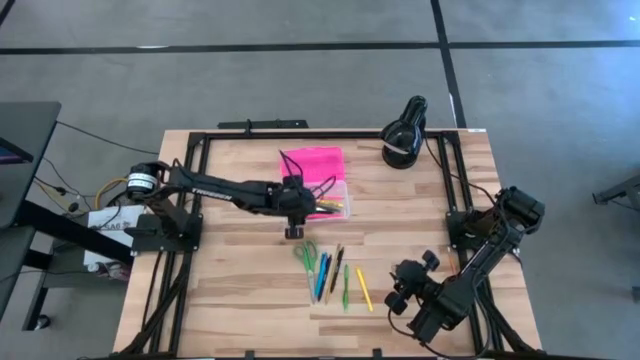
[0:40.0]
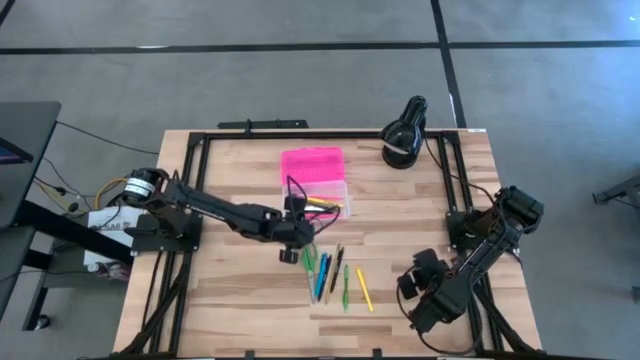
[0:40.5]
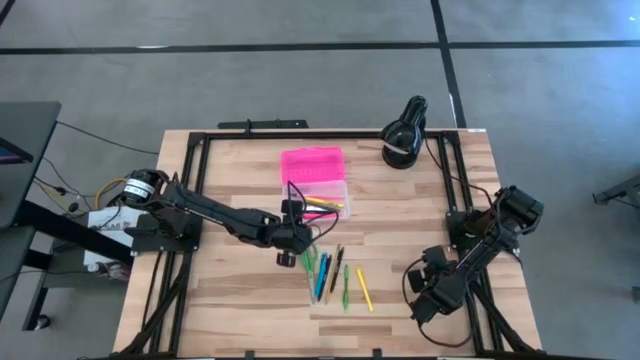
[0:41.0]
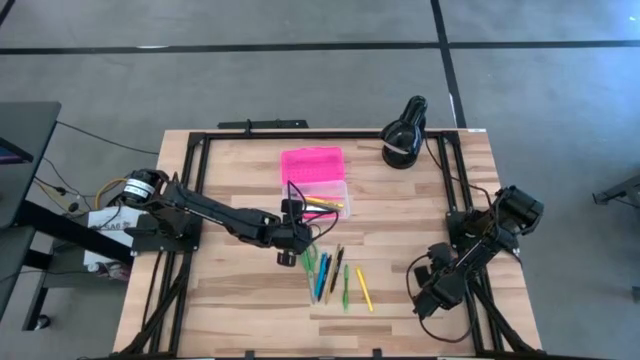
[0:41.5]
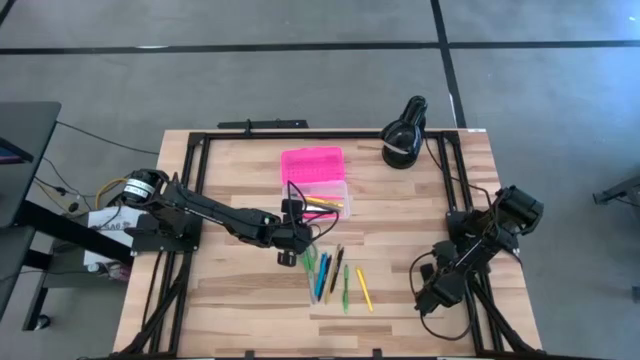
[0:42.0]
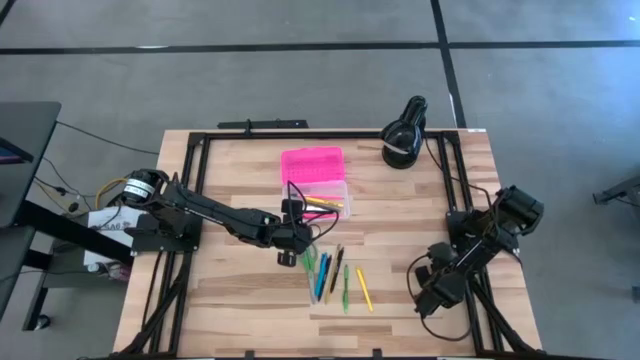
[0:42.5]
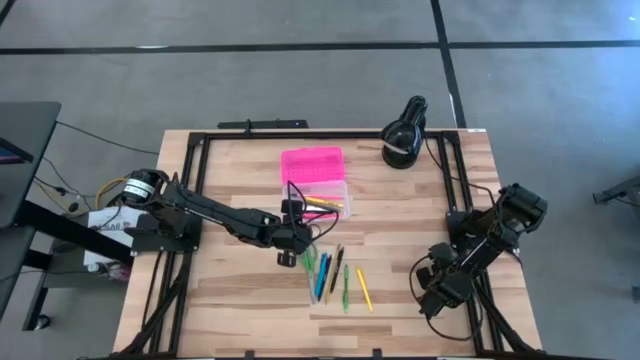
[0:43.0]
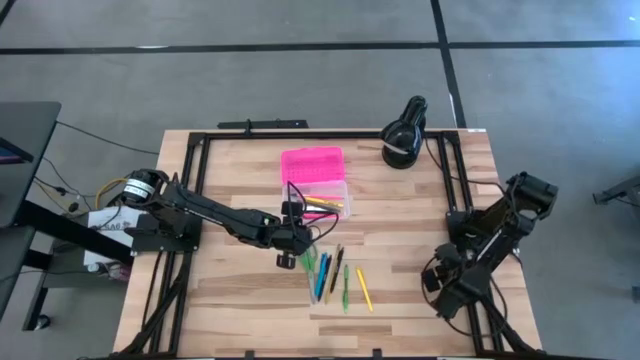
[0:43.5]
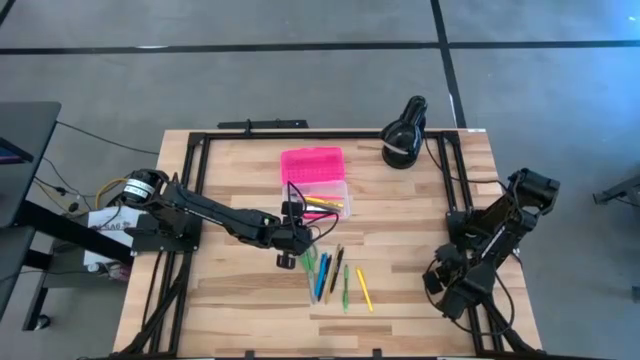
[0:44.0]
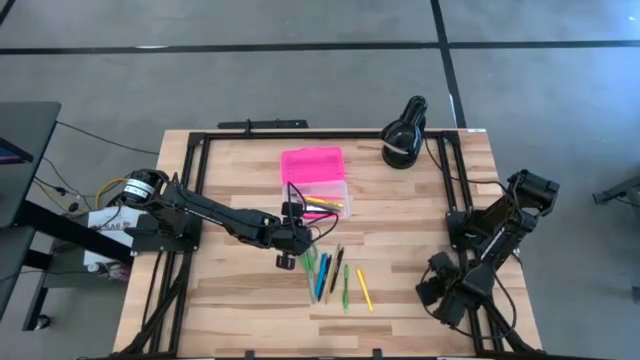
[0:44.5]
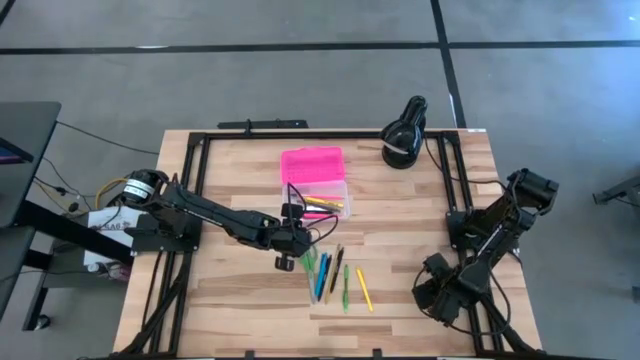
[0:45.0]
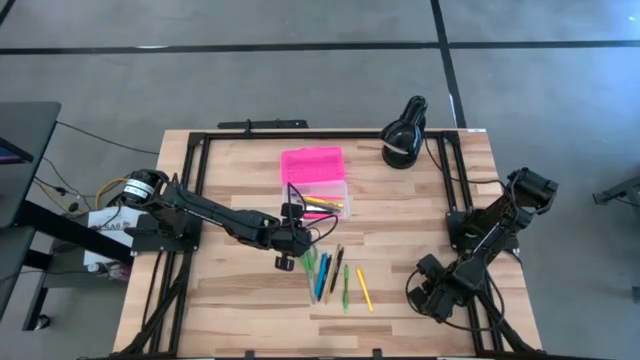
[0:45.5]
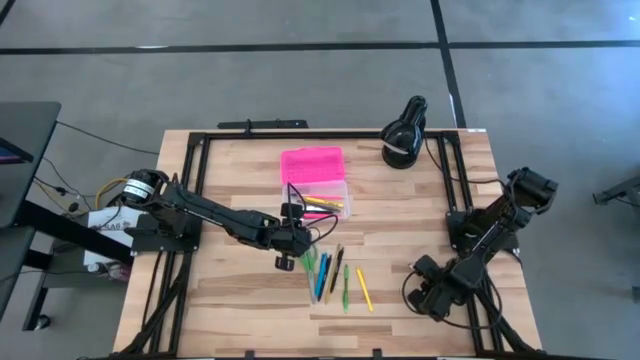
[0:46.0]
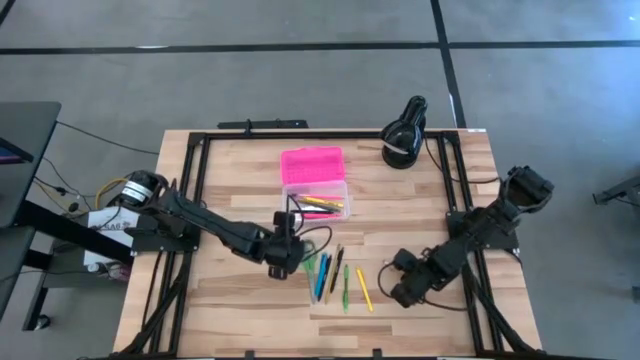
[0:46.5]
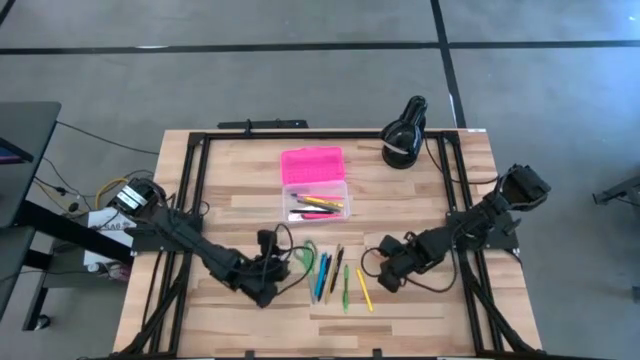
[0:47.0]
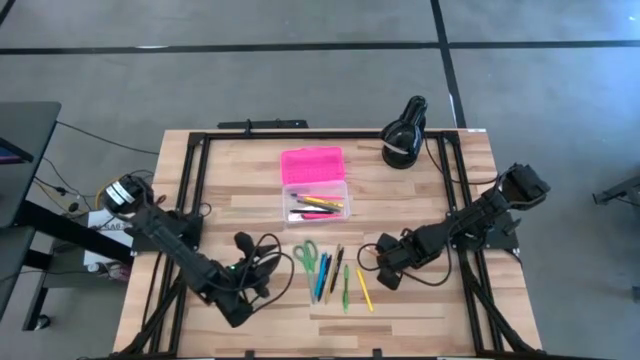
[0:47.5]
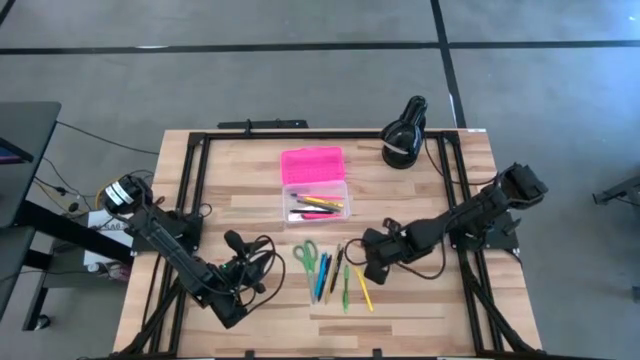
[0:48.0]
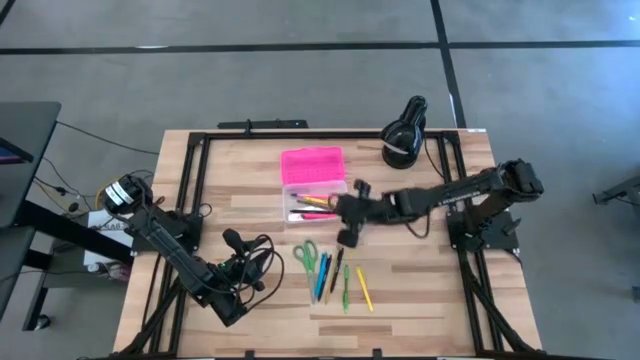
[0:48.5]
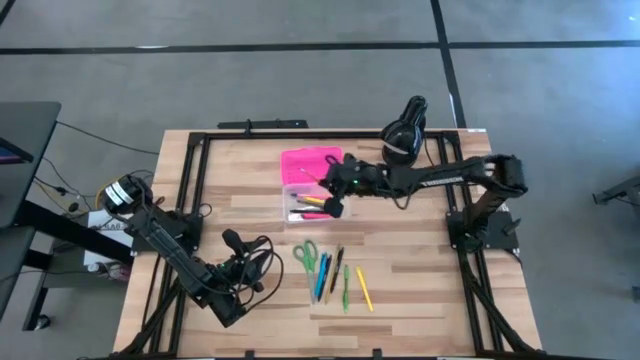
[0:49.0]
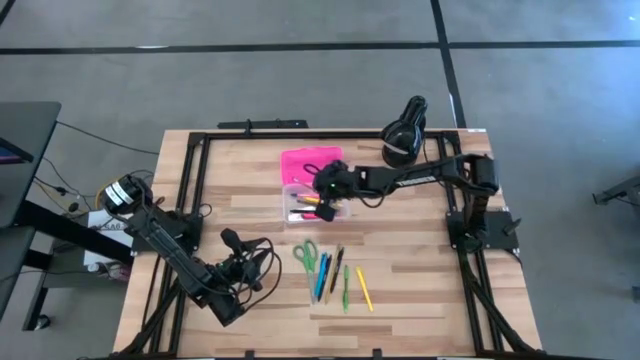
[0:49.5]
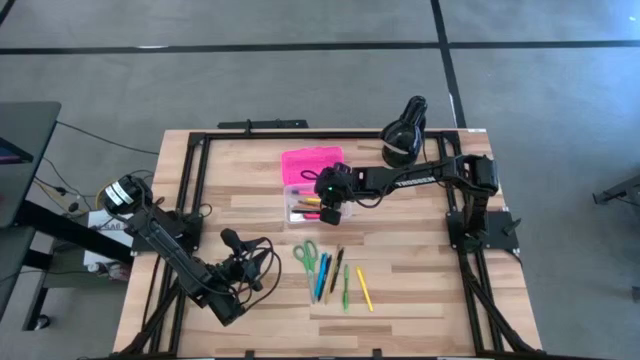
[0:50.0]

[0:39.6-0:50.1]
Task: Pick & place school supplies into a supply box
Put the orange pencil into the supply box

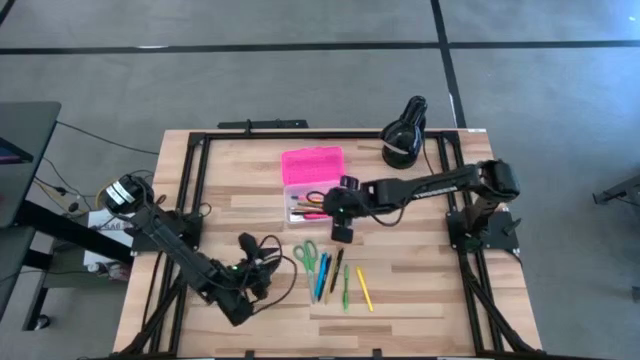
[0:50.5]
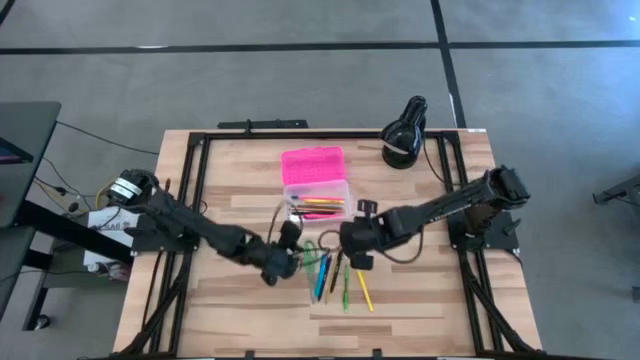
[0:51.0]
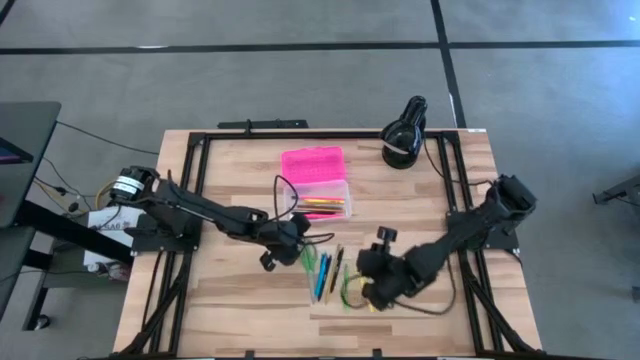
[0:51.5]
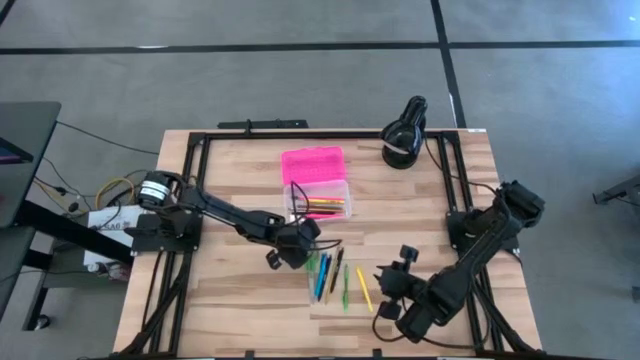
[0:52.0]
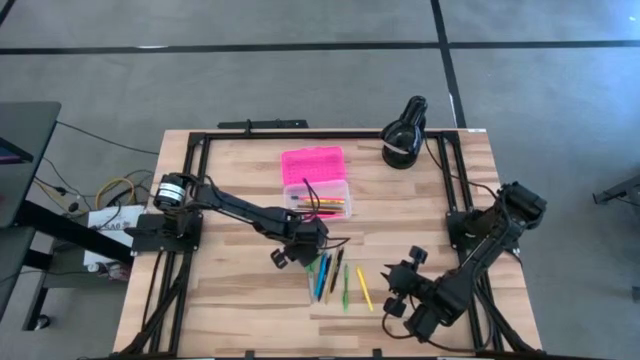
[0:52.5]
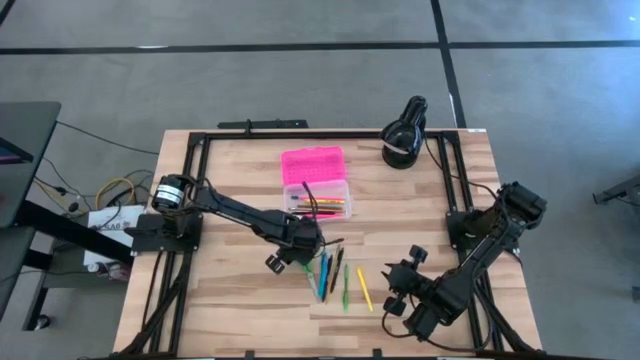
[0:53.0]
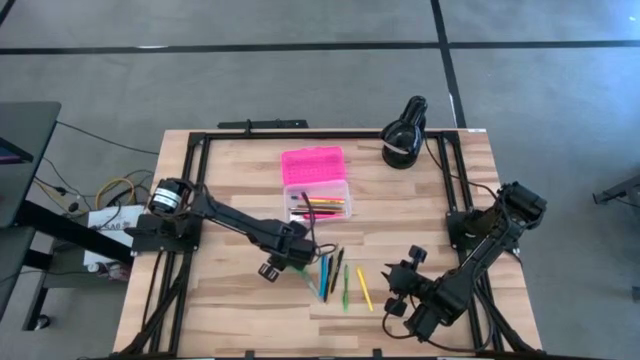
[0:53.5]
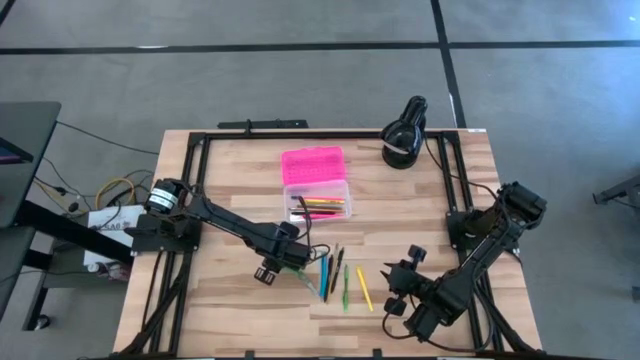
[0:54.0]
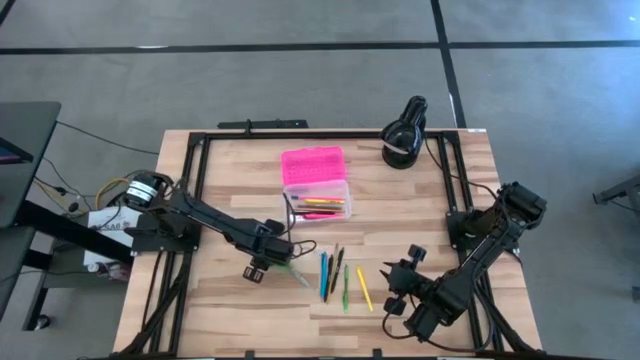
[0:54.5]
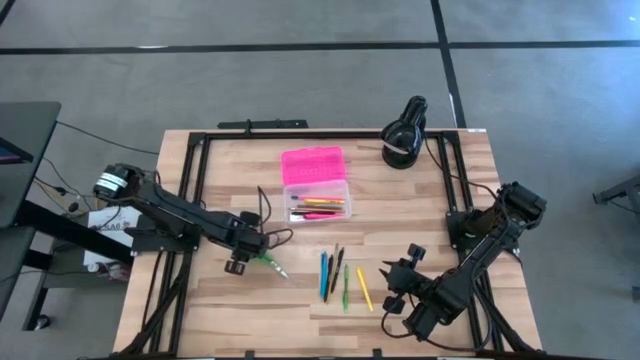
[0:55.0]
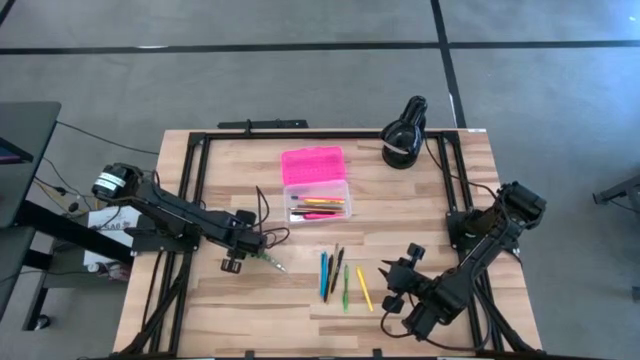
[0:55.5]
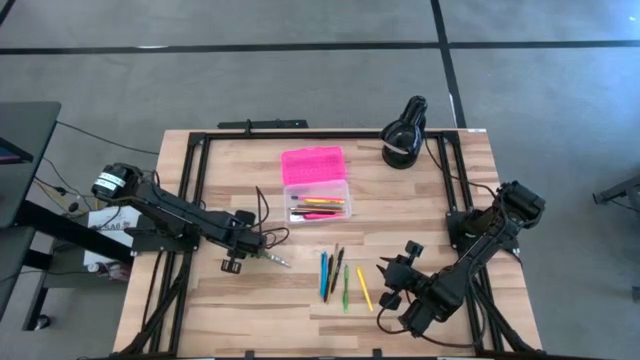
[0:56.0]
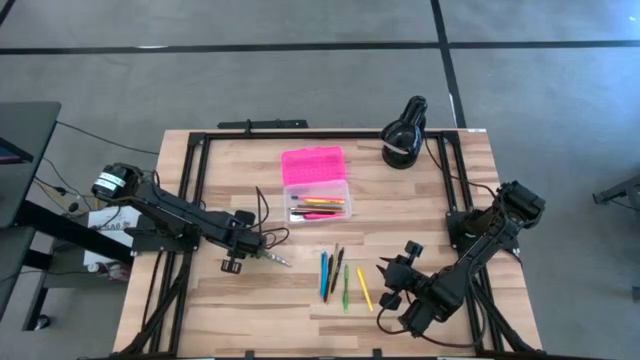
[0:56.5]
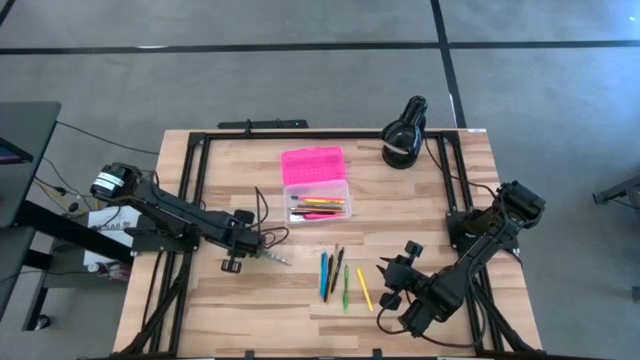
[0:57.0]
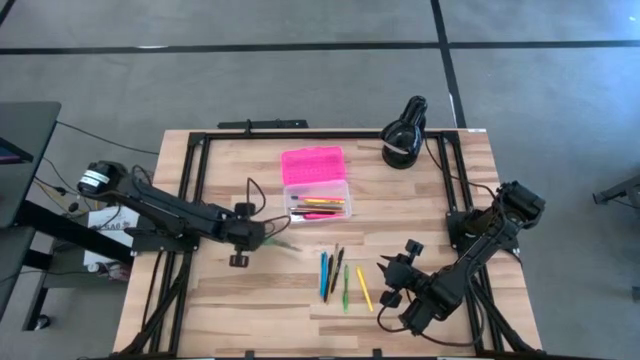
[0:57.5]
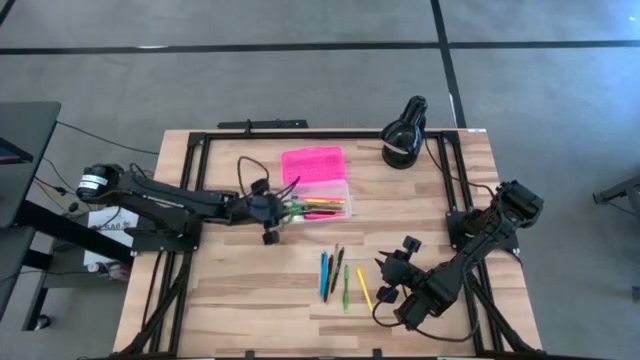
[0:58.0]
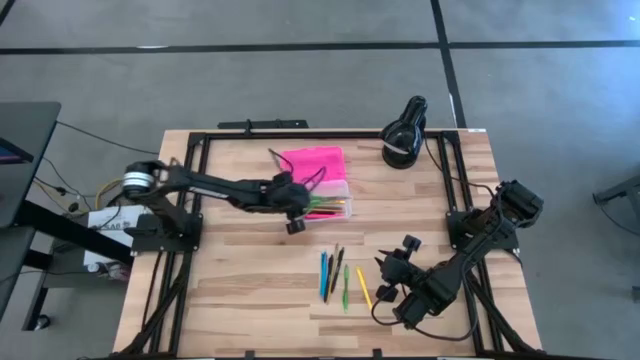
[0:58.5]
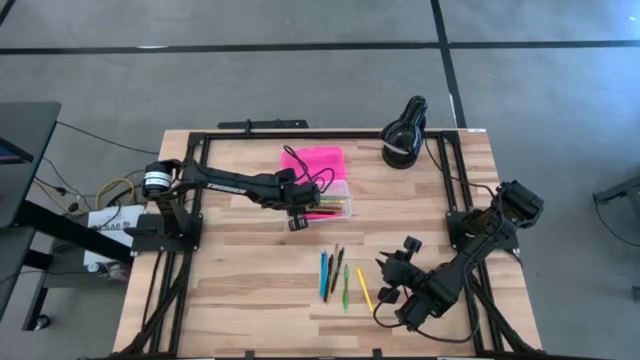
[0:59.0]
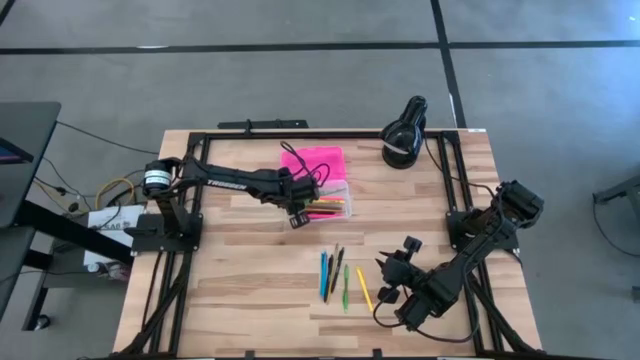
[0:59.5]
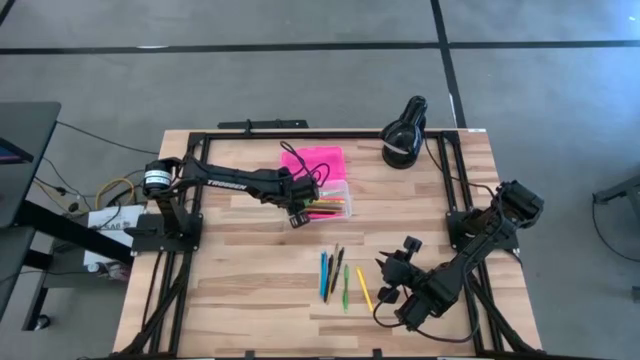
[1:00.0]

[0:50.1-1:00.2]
Put the green scissors into the supply box

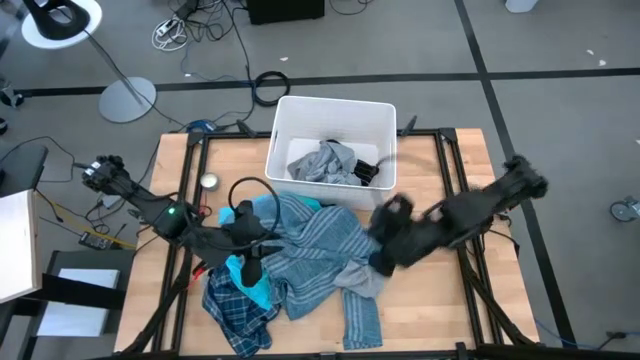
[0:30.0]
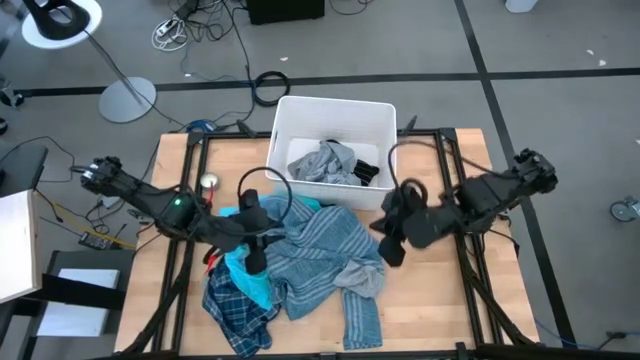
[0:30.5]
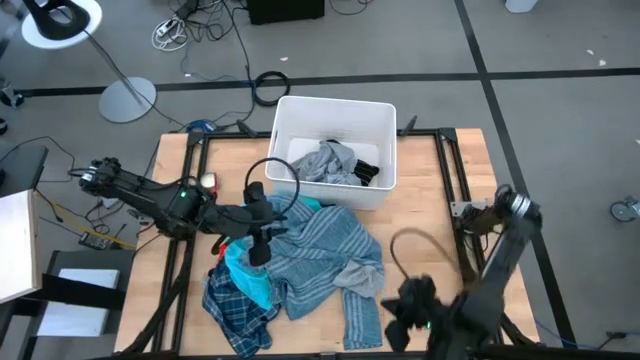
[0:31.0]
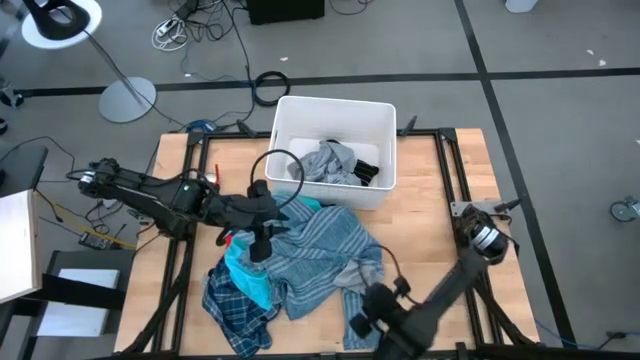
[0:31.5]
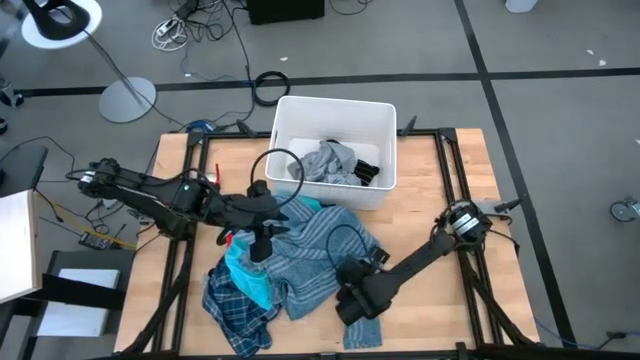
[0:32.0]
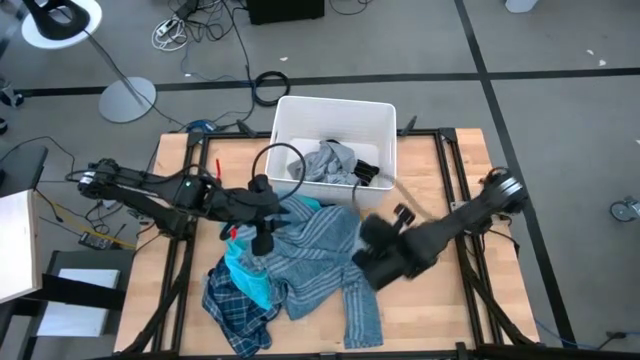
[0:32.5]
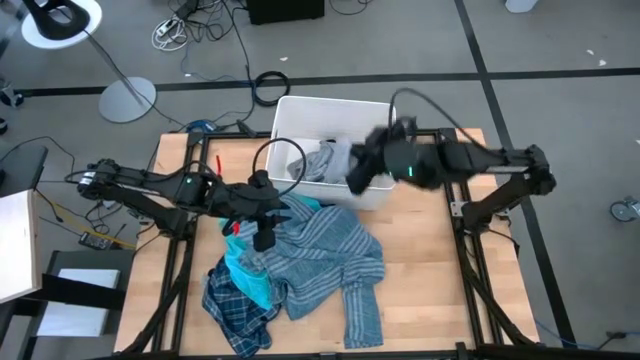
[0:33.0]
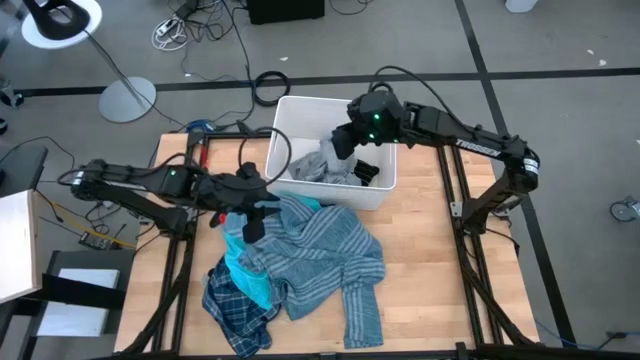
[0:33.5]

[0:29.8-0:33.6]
Task: Sort clothes
Put the gray sock into the white bin
